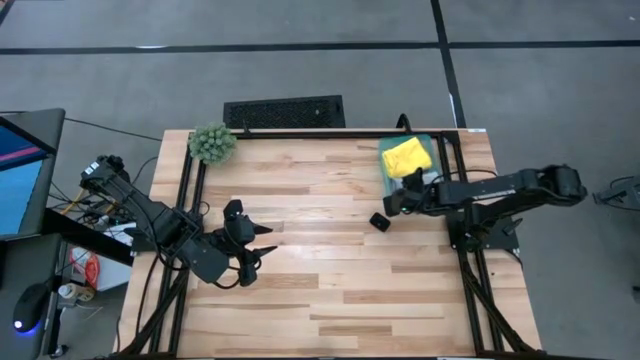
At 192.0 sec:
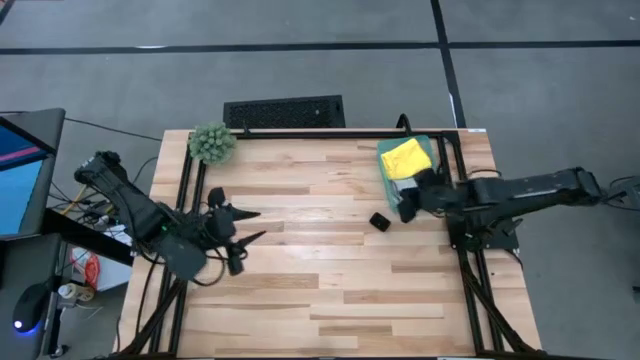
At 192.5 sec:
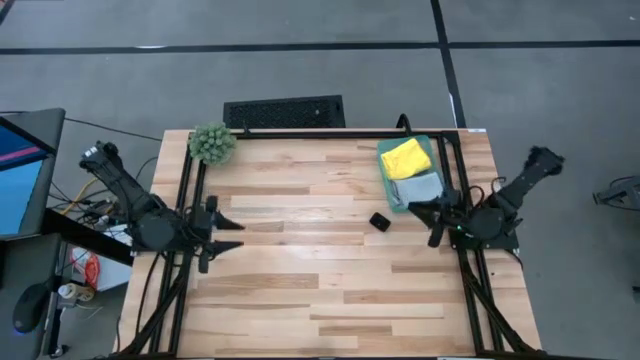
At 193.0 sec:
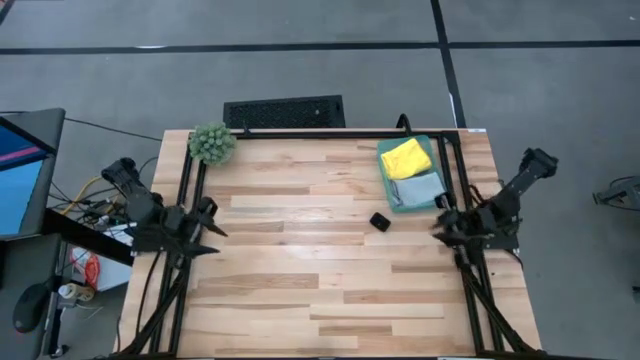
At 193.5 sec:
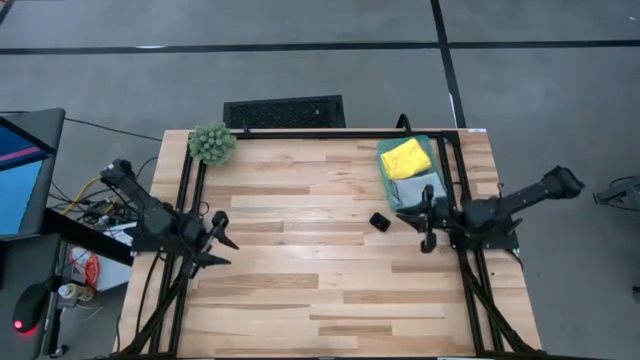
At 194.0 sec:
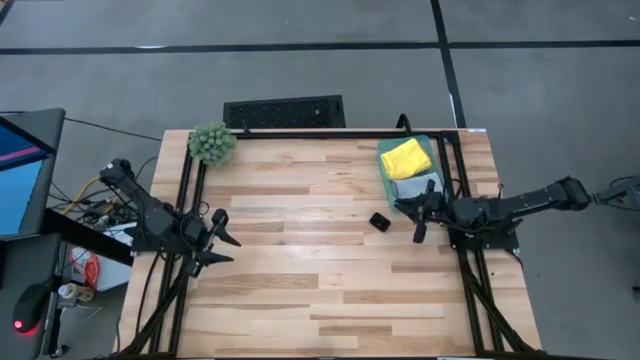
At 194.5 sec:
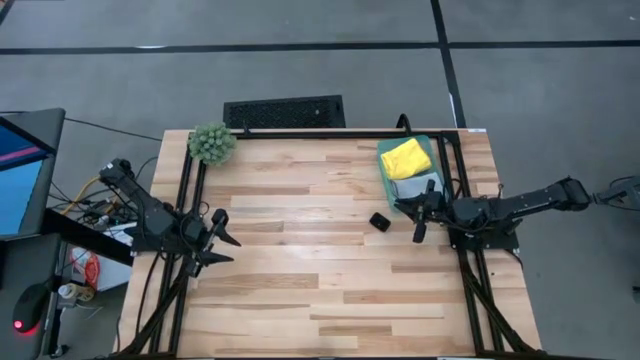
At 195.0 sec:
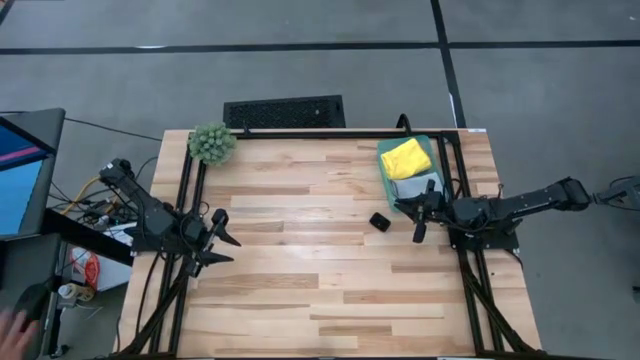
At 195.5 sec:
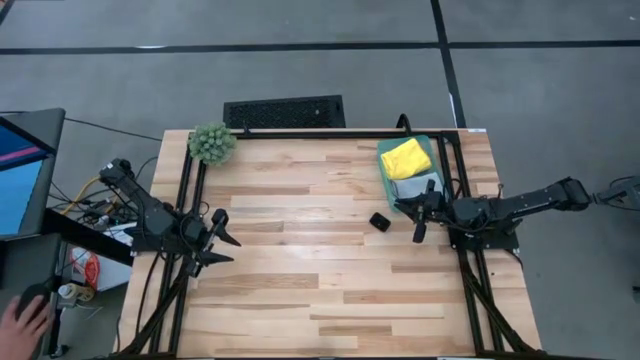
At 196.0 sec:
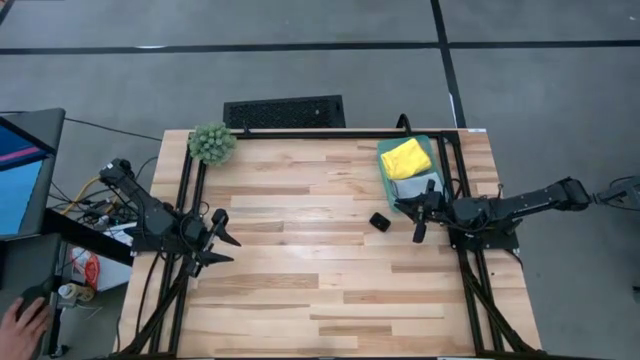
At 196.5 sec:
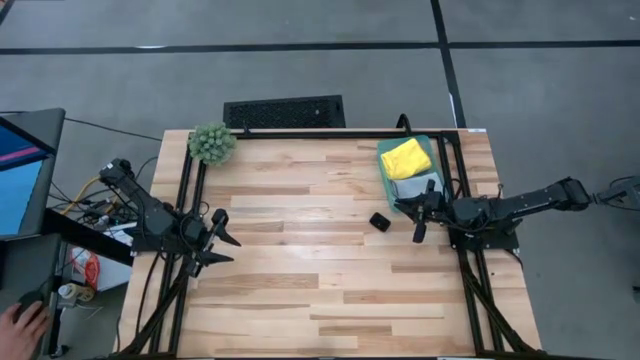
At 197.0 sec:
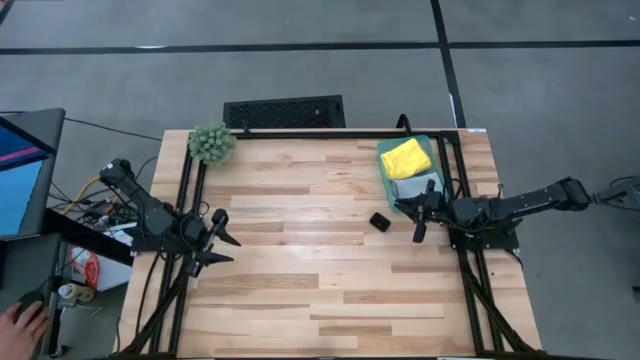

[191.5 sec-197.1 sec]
Task: Fold microfiber towels
Return to Home Position

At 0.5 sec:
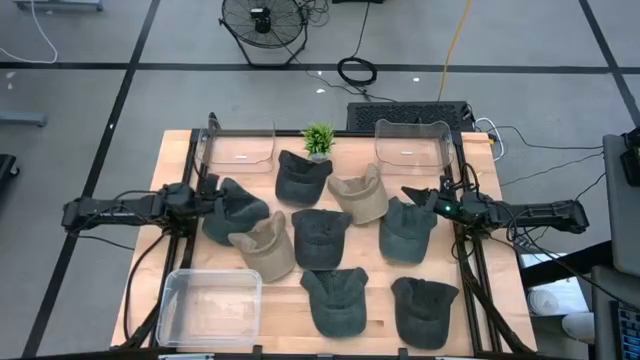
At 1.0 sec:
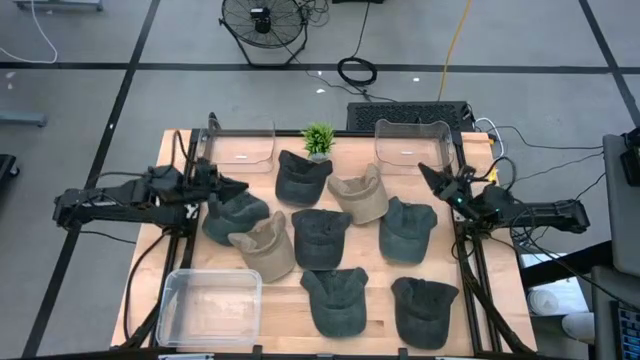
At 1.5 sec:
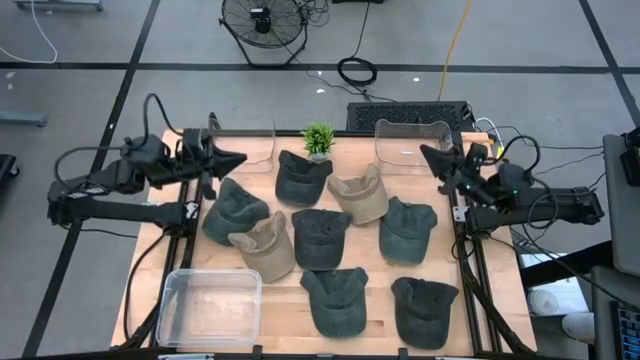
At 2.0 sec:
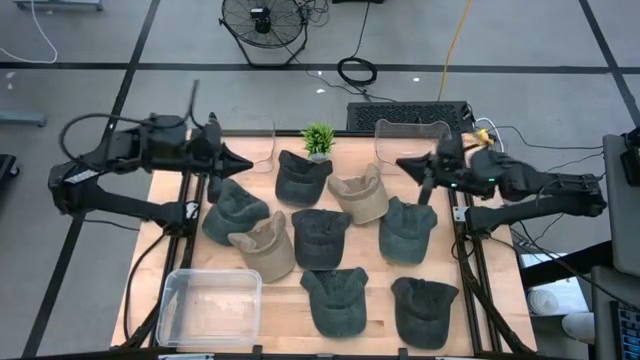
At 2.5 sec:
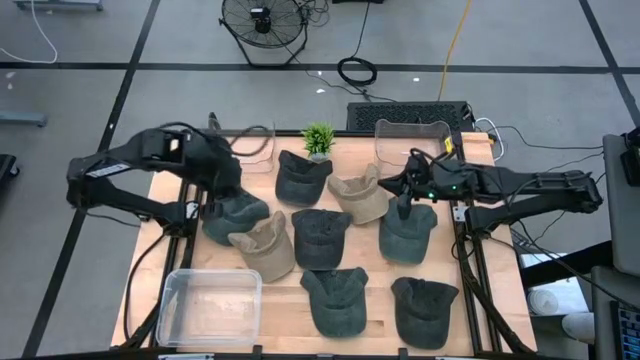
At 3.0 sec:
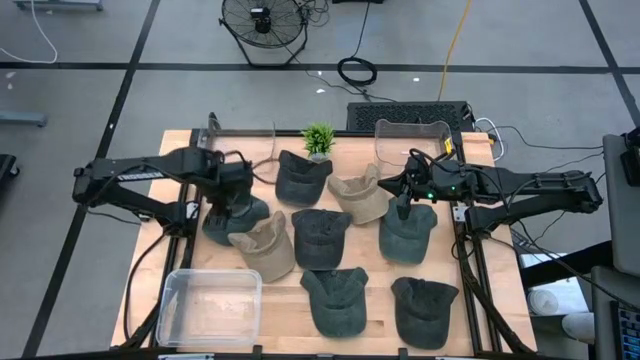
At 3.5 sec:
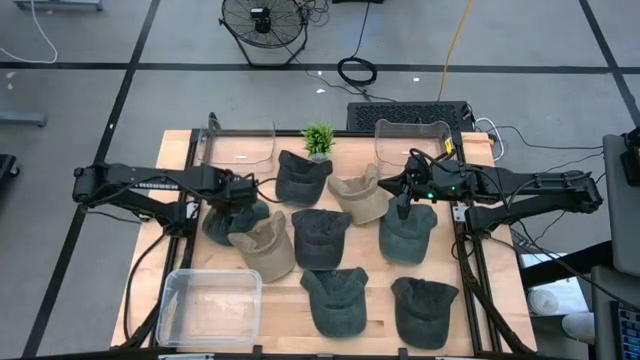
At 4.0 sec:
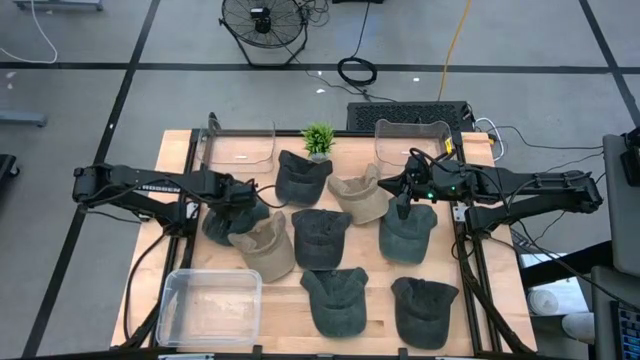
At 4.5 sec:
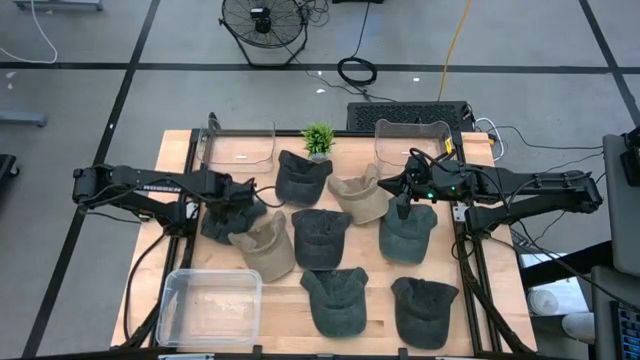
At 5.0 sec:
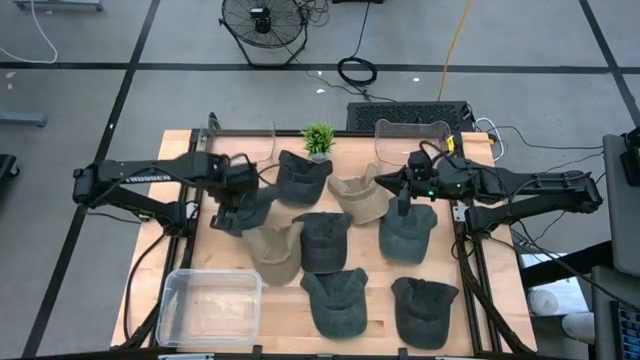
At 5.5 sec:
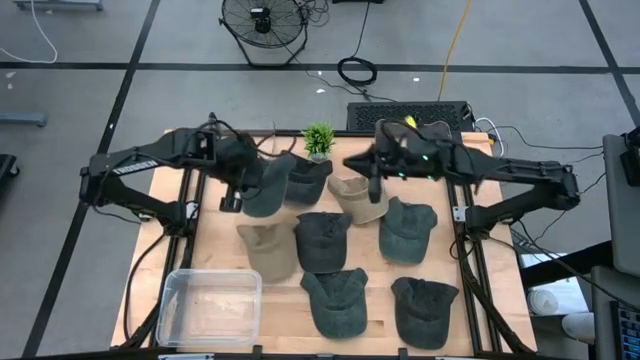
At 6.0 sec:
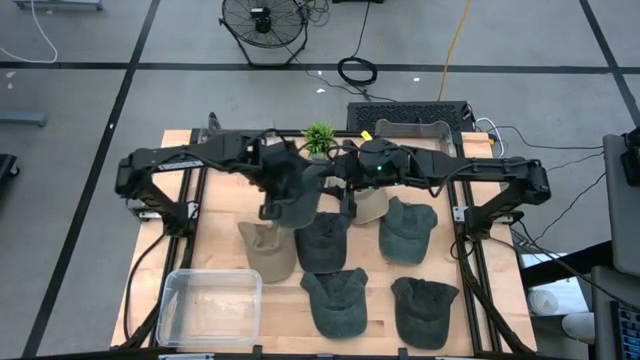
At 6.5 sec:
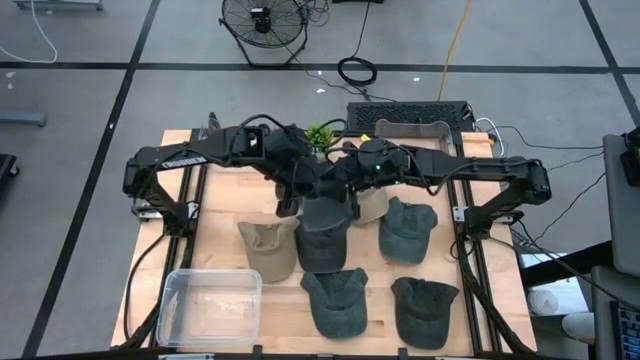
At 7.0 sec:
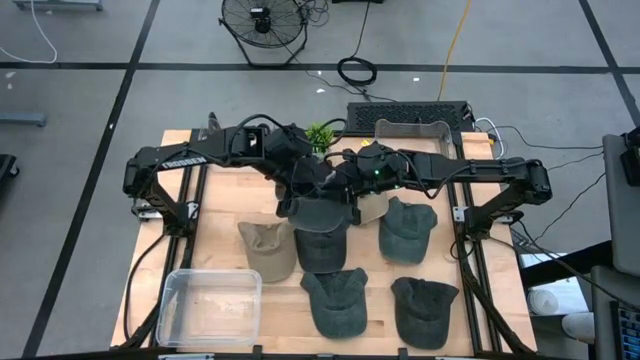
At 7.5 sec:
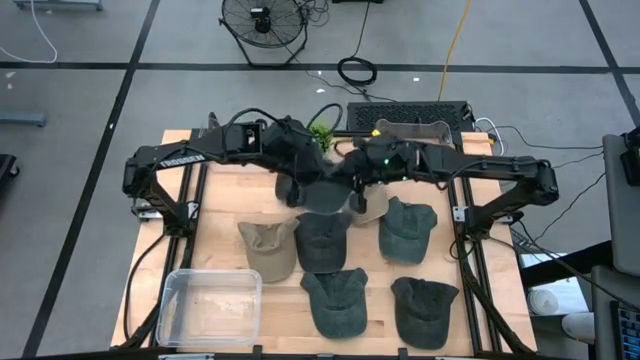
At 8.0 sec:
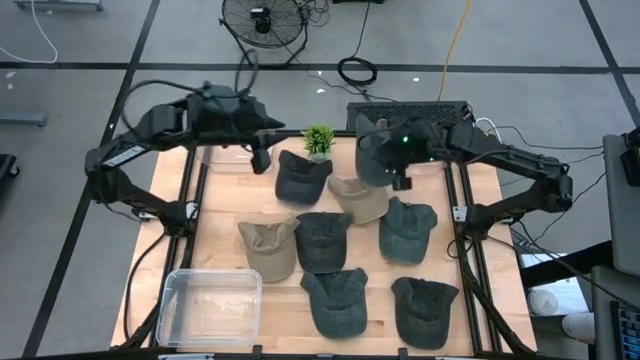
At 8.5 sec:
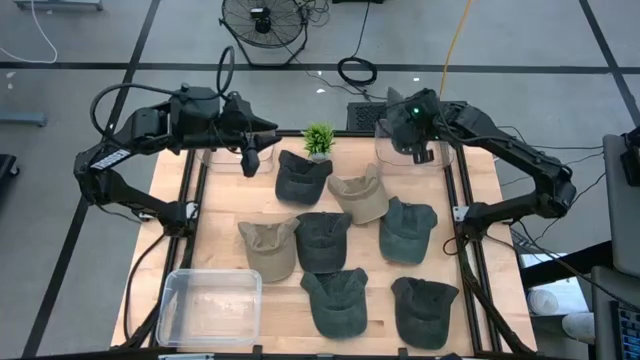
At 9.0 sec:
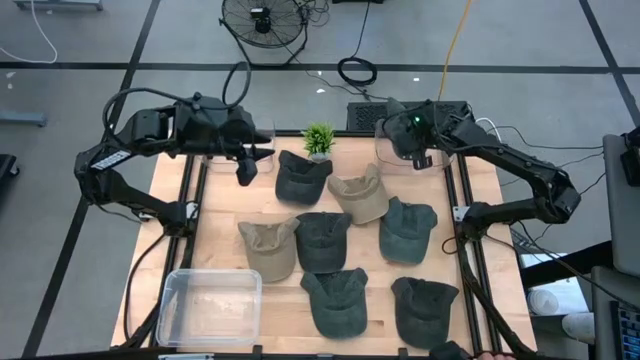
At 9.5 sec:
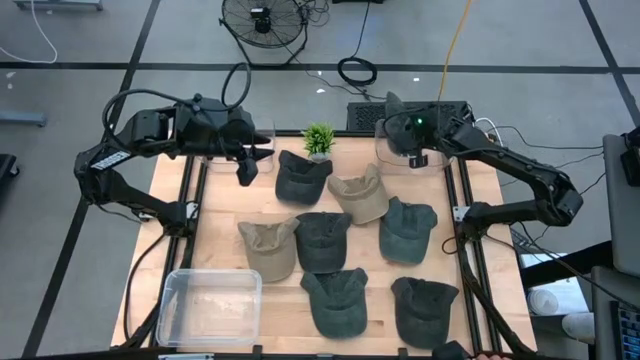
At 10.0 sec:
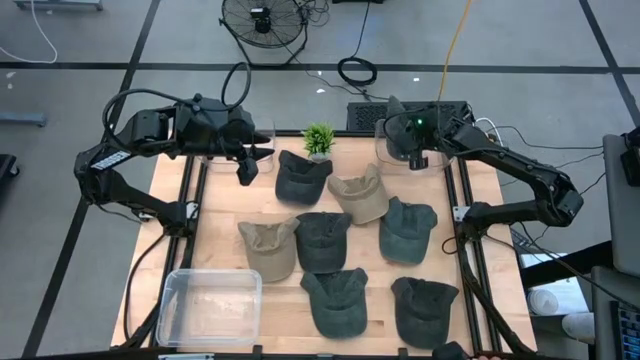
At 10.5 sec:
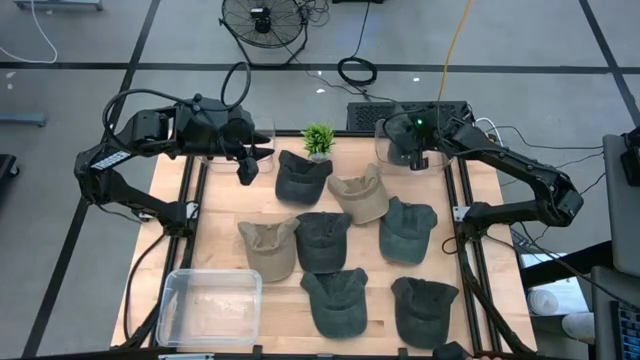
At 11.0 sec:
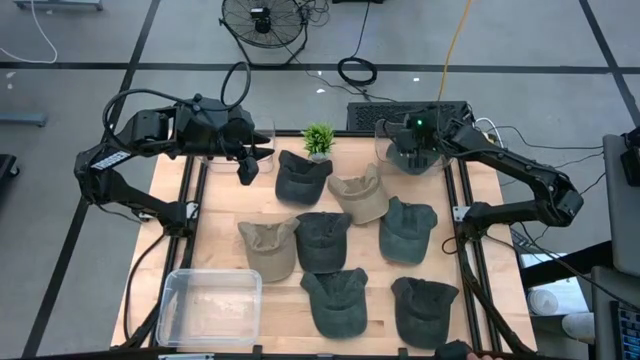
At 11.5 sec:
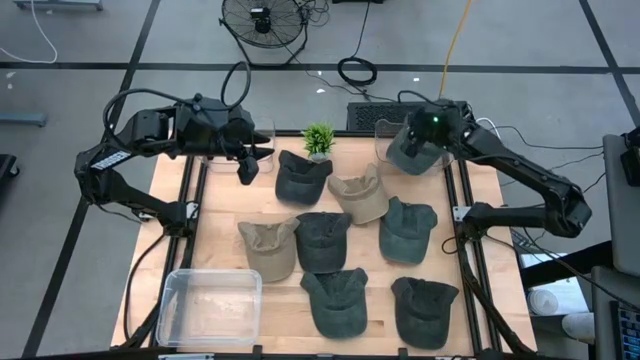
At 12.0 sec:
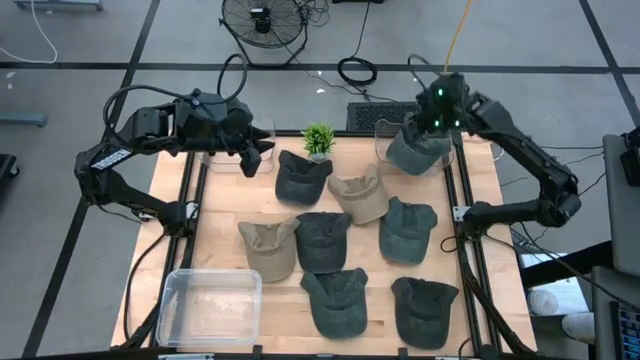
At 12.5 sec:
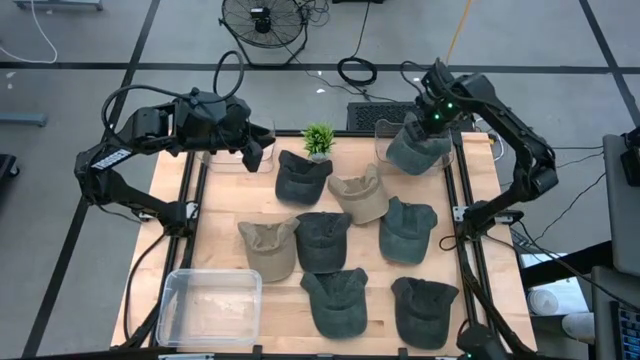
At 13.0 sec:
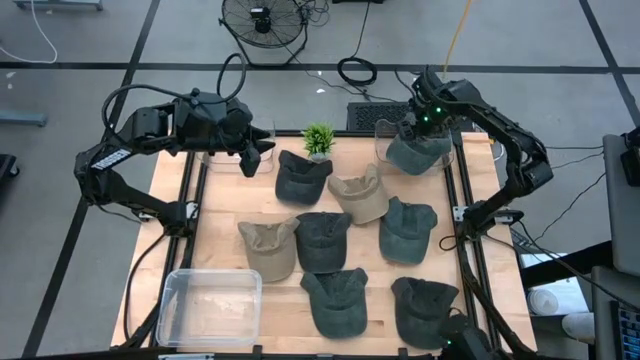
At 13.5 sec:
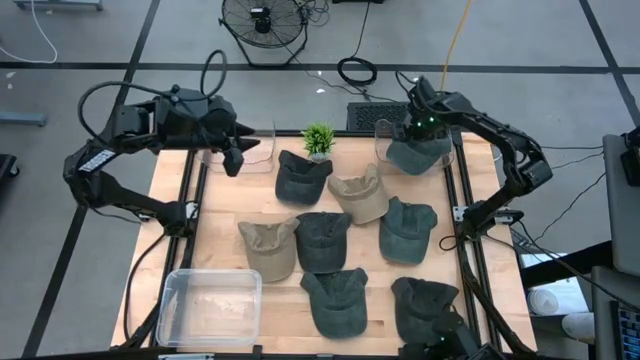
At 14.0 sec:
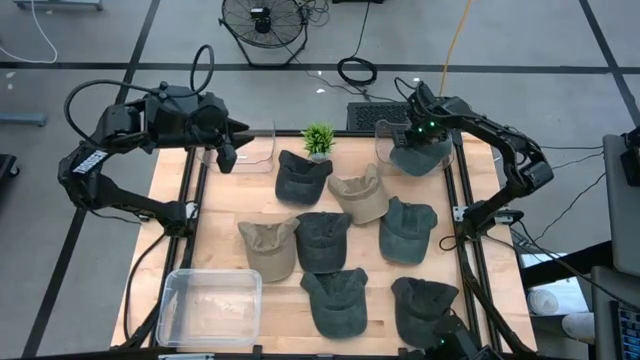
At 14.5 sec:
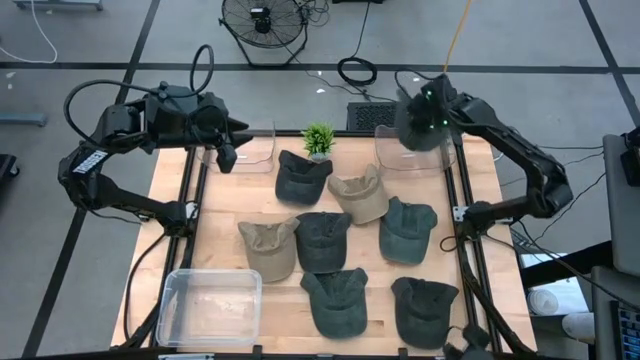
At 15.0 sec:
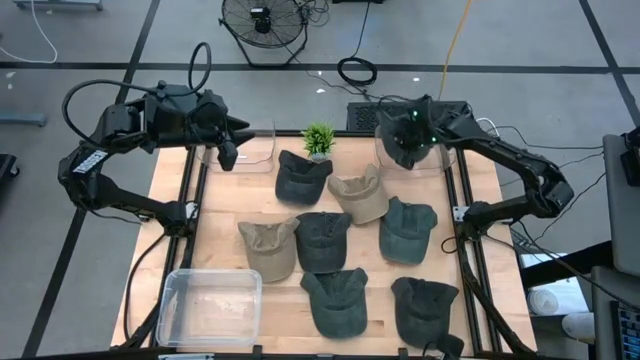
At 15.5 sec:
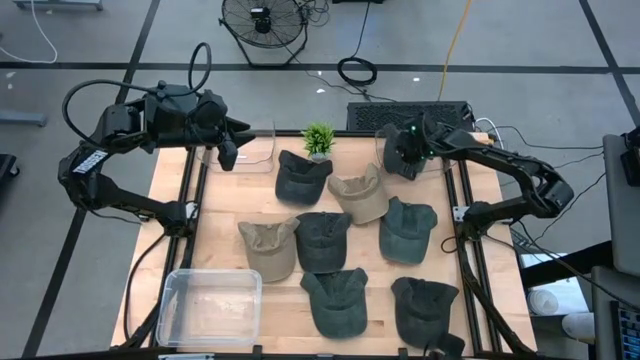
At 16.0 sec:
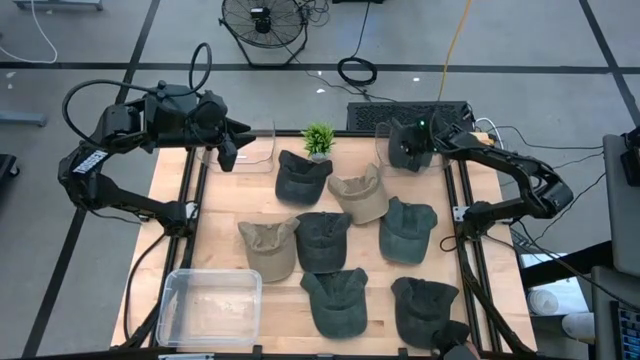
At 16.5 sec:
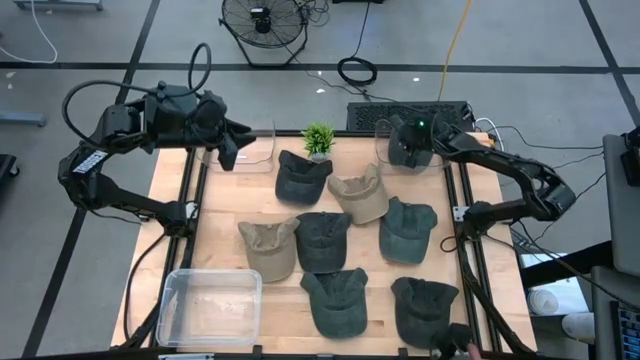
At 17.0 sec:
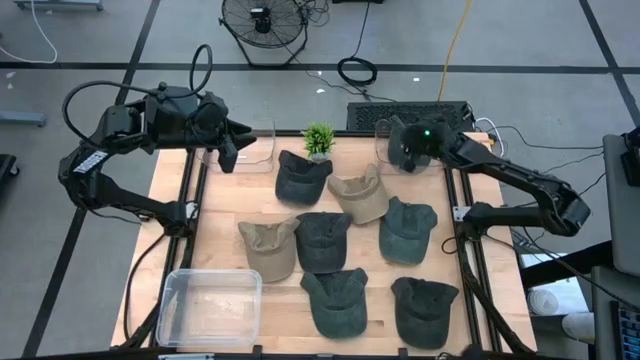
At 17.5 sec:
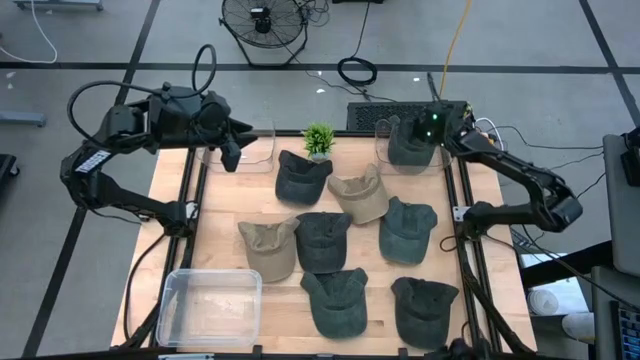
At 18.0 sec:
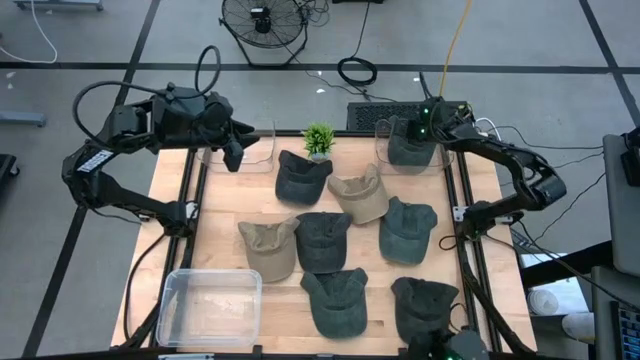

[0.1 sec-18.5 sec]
Task: Pick & Place hat
Put the top left green cap into the right transparent bin
